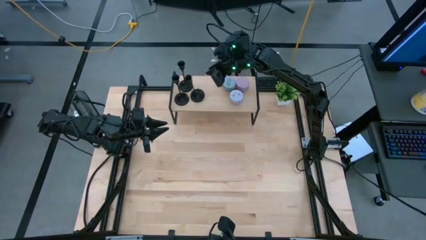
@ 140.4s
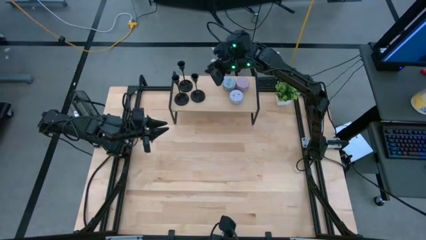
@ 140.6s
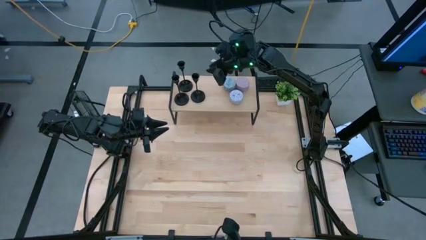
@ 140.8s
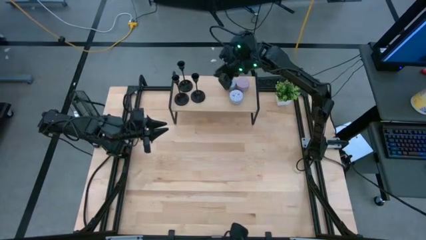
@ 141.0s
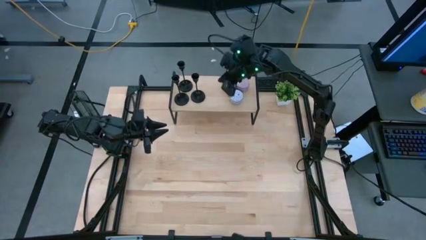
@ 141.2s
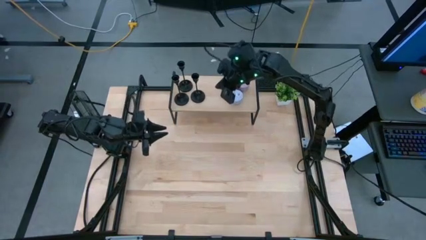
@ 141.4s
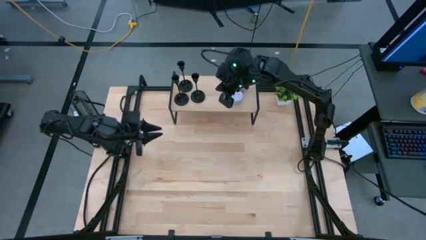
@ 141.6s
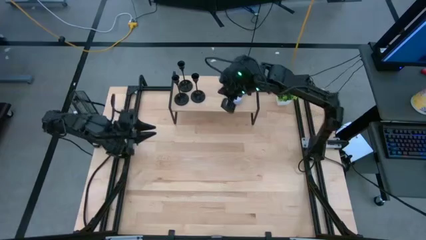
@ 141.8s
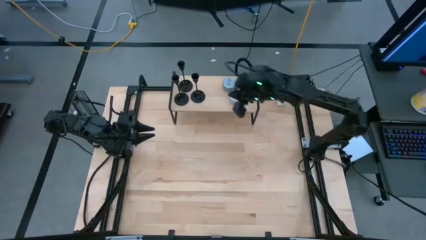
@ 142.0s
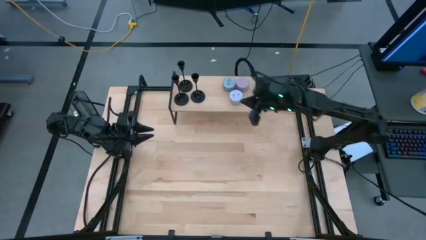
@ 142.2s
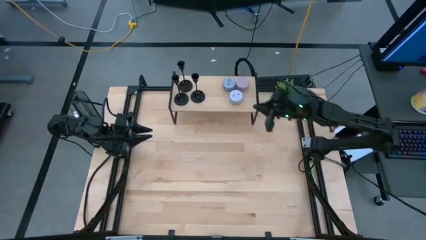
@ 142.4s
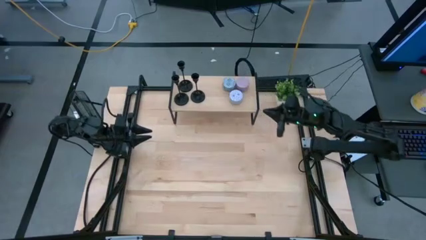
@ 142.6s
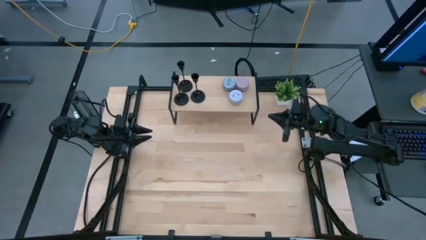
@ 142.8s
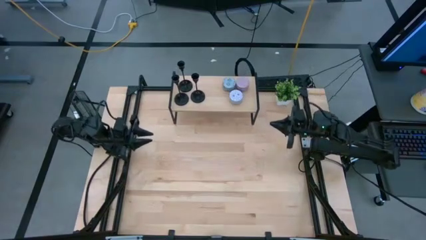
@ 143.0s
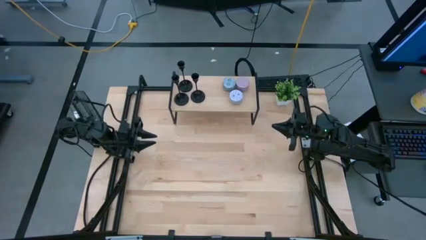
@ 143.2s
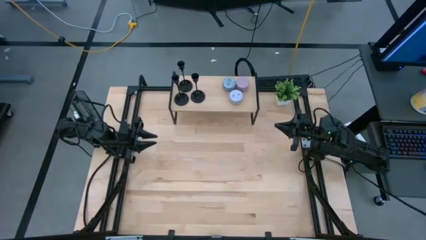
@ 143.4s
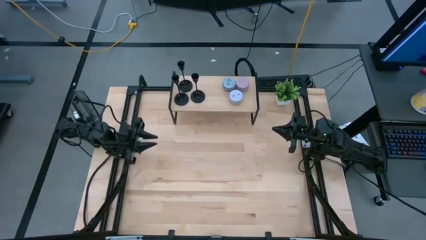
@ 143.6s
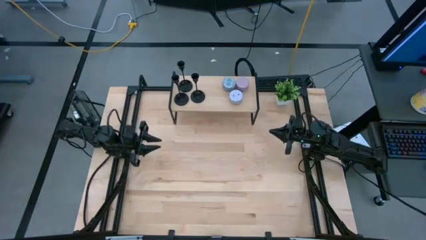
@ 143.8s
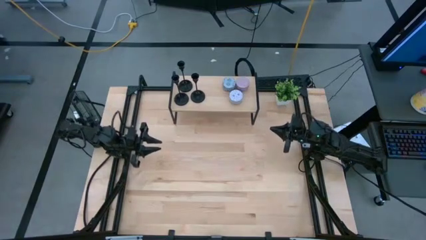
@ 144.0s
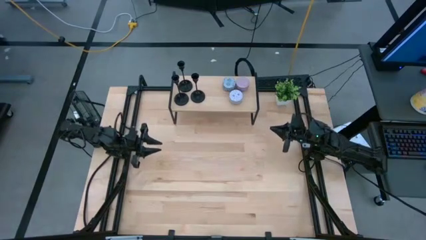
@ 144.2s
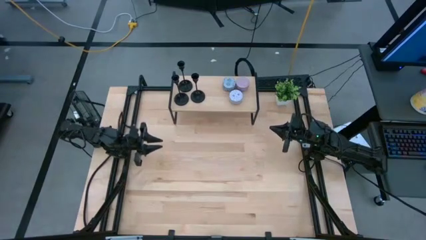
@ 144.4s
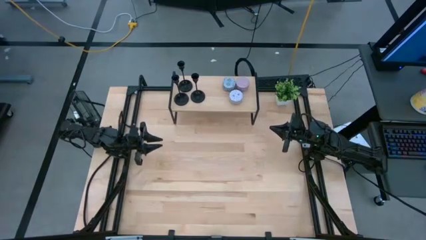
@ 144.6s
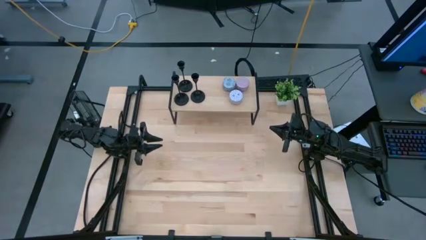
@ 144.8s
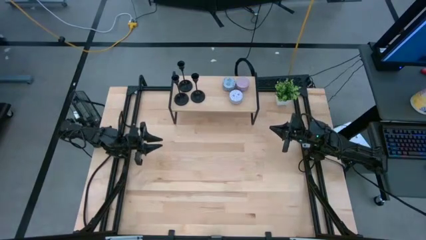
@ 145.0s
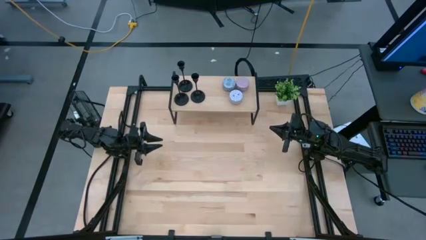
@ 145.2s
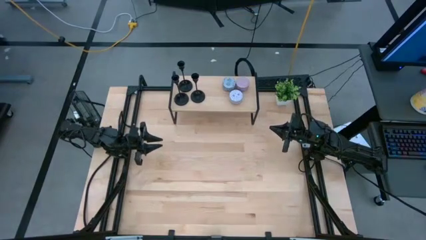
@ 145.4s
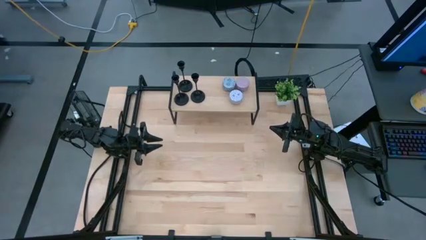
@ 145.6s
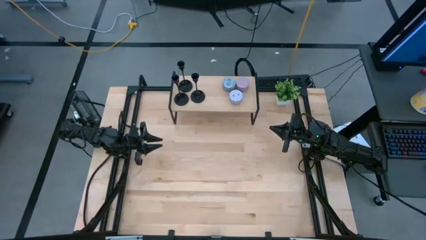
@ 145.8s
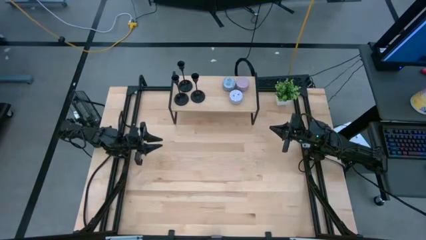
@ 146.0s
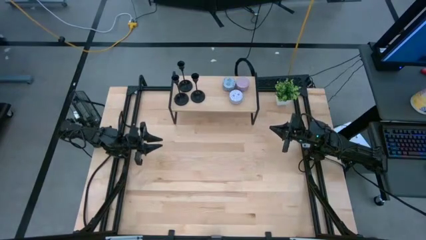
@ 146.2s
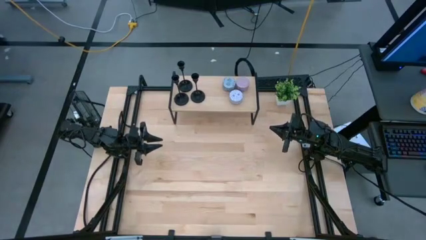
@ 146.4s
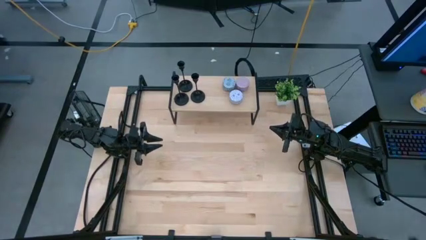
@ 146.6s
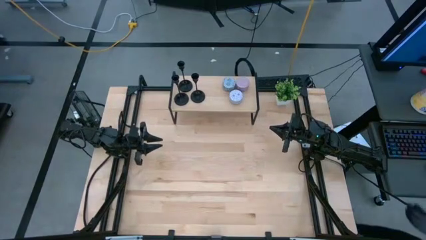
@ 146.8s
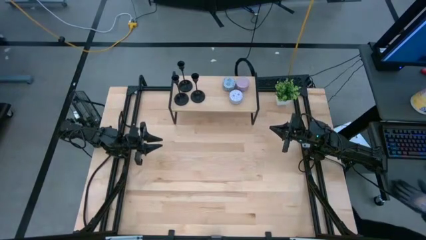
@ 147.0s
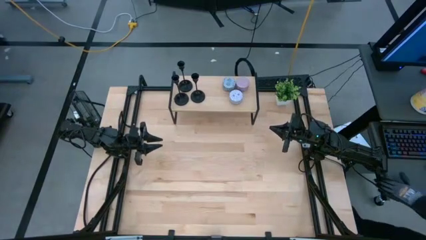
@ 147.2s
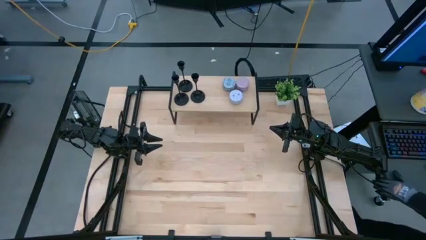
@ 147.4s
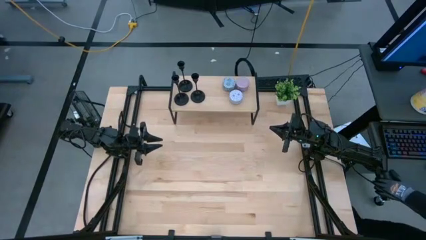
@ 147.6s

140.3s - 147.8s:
Task: Pick & Place candle stick holders
Return to Home Position

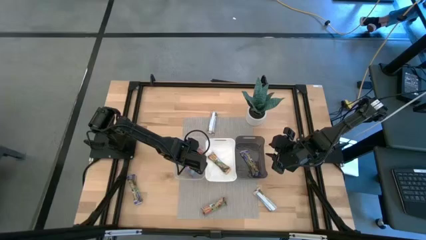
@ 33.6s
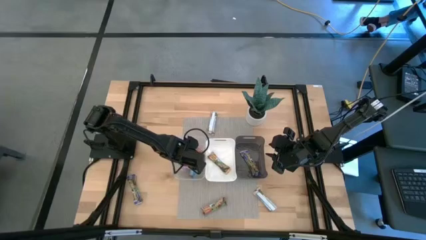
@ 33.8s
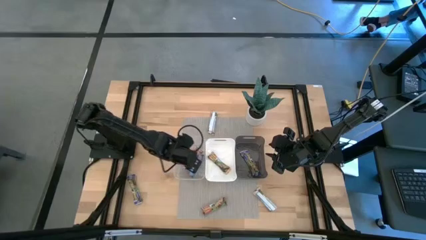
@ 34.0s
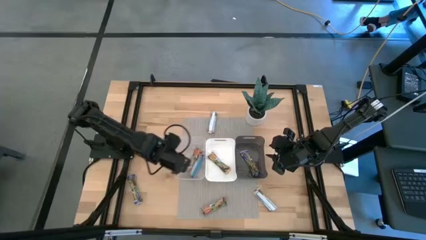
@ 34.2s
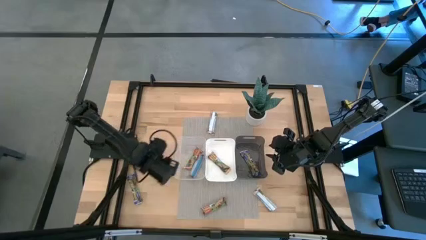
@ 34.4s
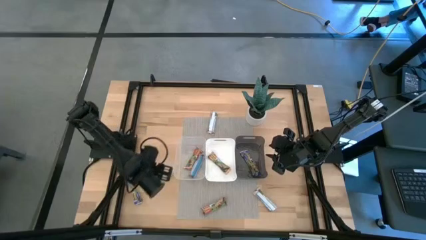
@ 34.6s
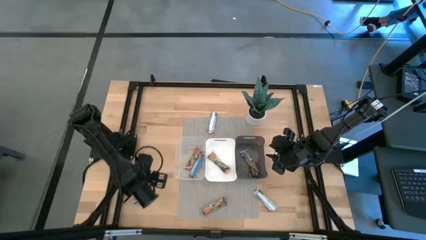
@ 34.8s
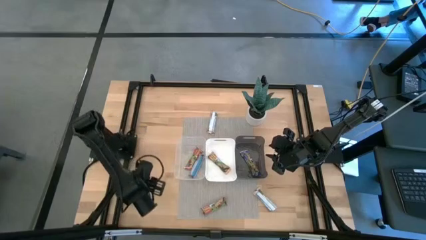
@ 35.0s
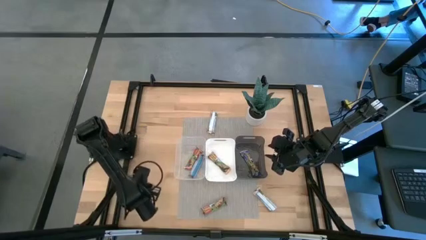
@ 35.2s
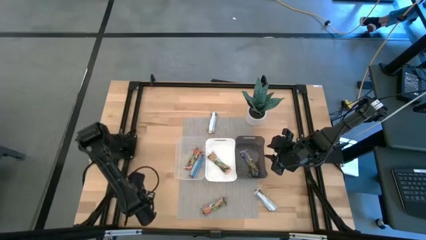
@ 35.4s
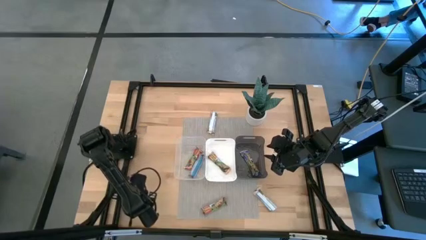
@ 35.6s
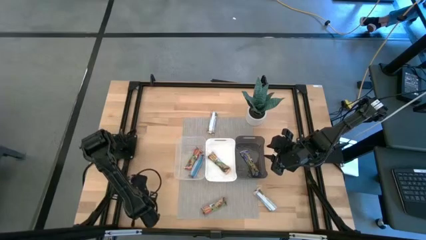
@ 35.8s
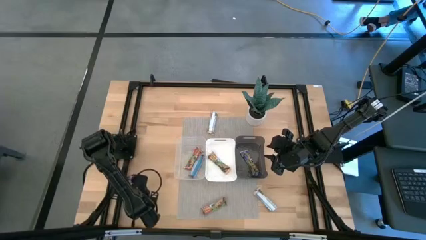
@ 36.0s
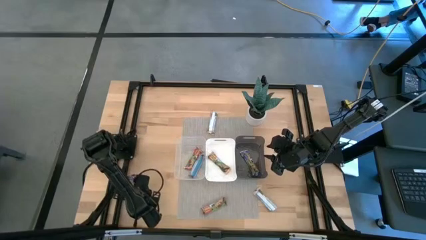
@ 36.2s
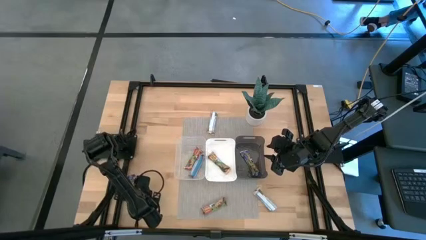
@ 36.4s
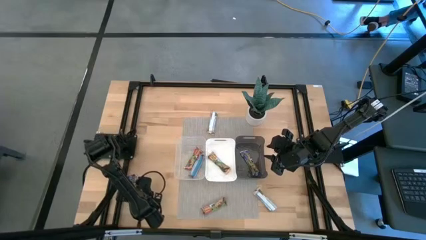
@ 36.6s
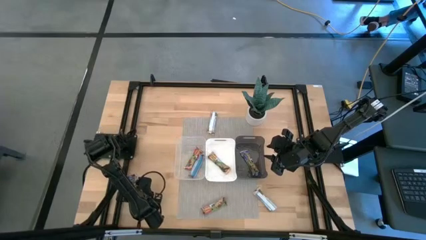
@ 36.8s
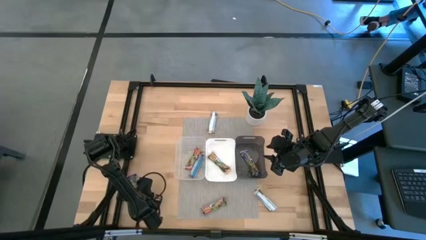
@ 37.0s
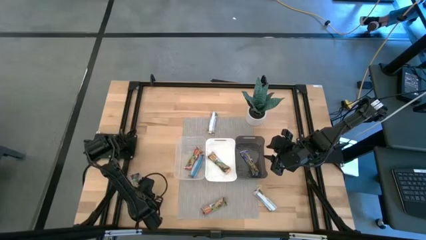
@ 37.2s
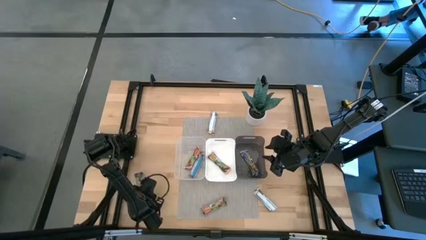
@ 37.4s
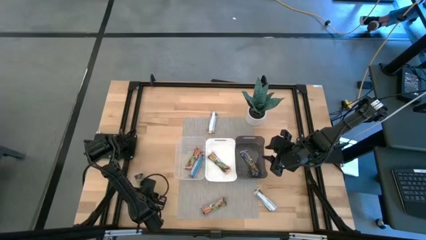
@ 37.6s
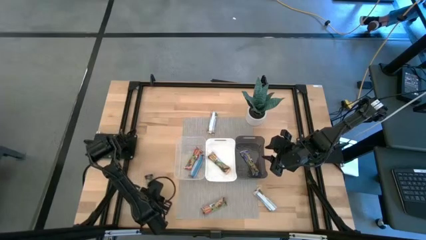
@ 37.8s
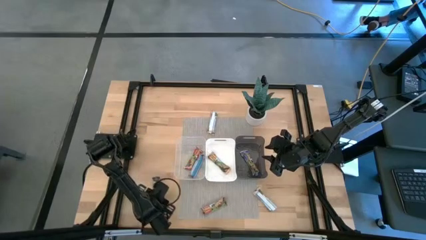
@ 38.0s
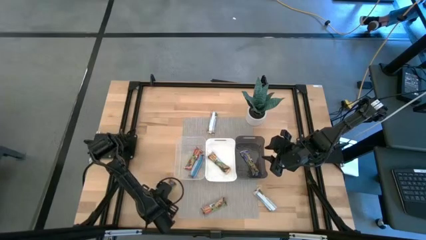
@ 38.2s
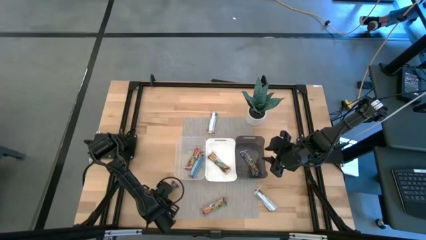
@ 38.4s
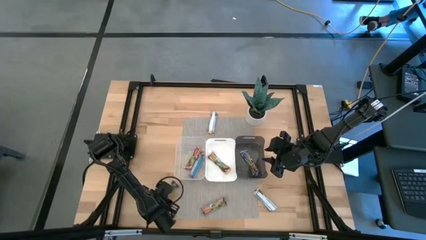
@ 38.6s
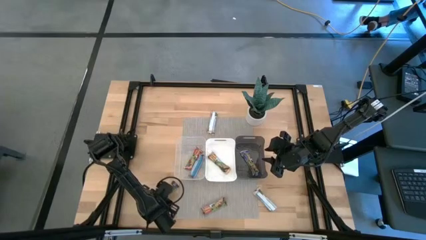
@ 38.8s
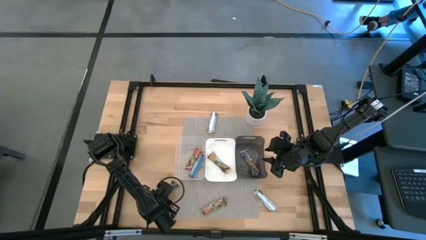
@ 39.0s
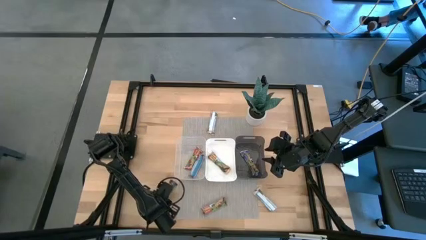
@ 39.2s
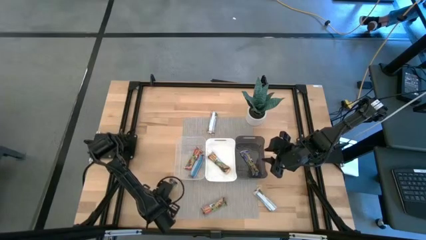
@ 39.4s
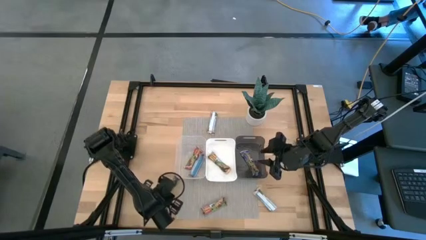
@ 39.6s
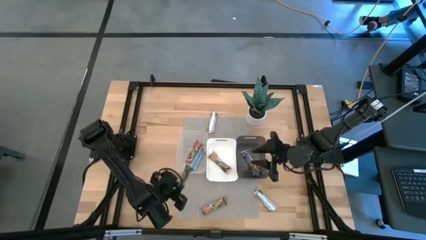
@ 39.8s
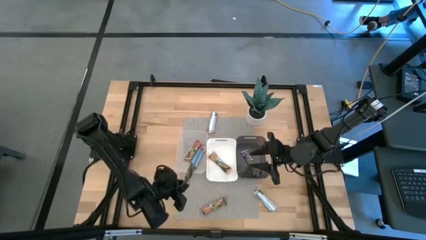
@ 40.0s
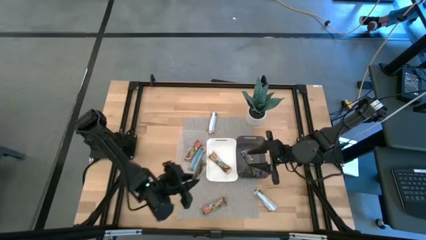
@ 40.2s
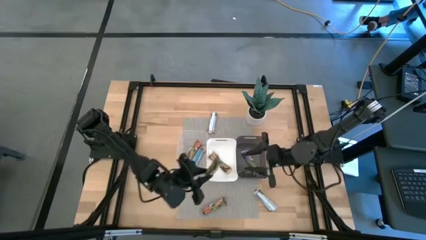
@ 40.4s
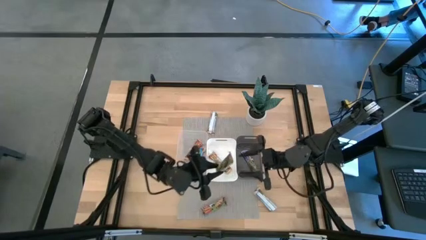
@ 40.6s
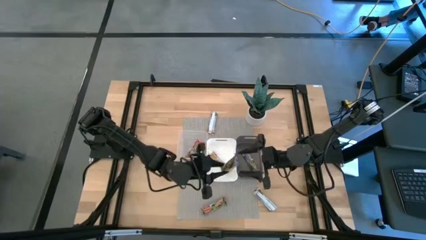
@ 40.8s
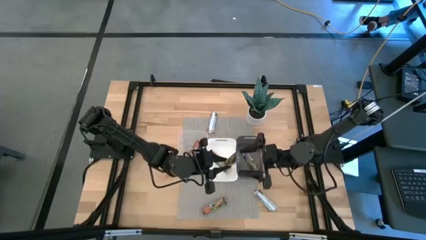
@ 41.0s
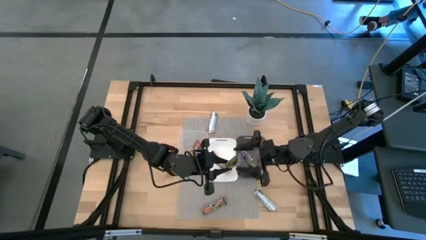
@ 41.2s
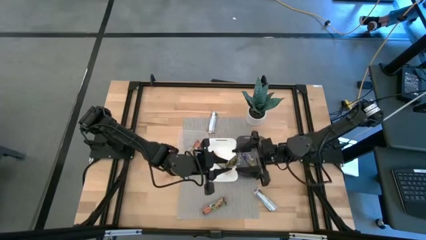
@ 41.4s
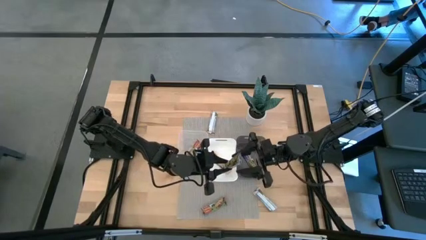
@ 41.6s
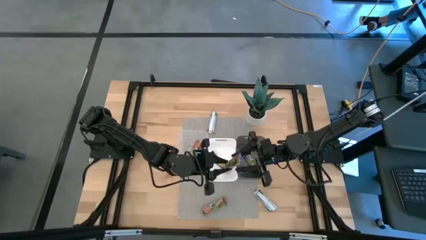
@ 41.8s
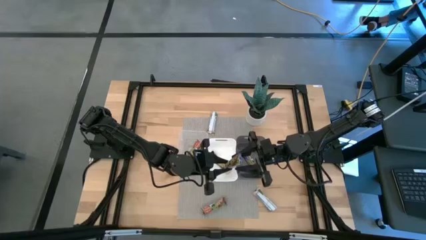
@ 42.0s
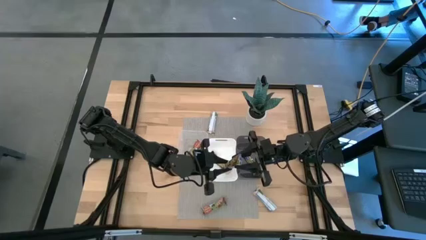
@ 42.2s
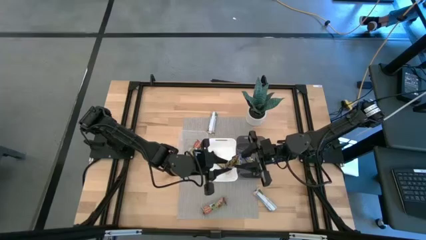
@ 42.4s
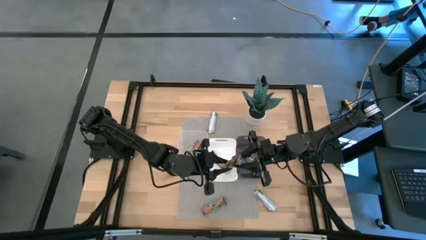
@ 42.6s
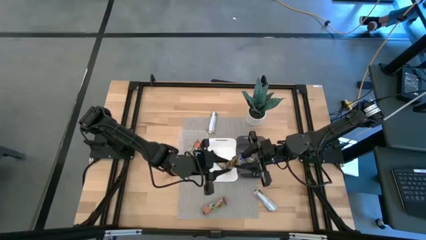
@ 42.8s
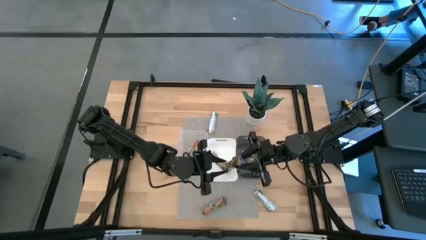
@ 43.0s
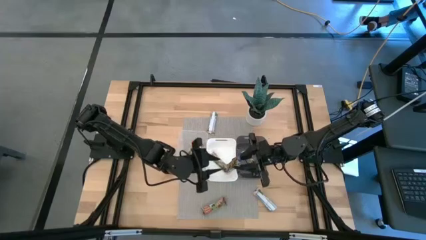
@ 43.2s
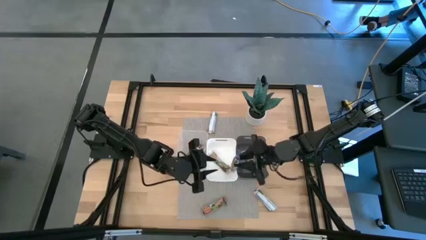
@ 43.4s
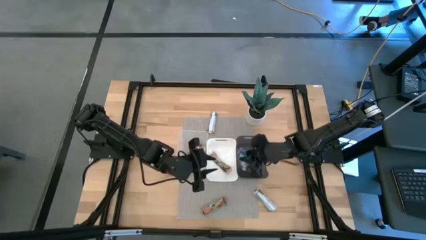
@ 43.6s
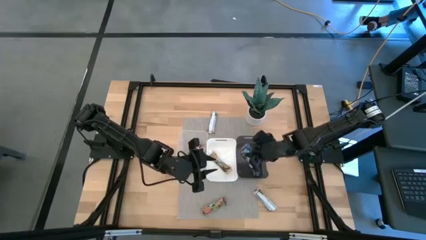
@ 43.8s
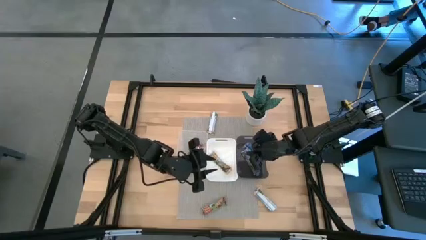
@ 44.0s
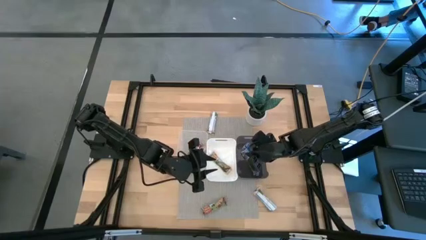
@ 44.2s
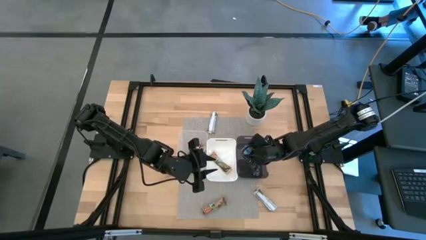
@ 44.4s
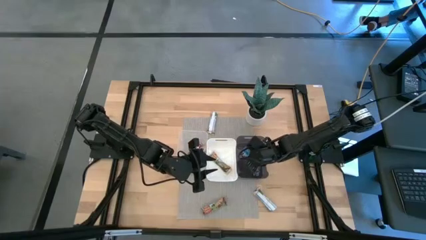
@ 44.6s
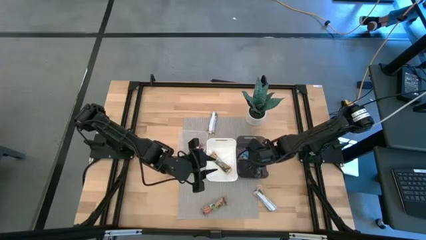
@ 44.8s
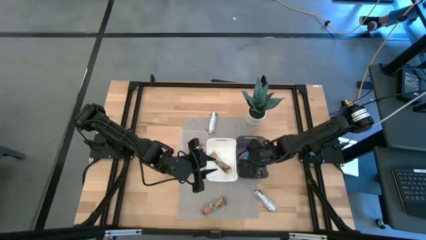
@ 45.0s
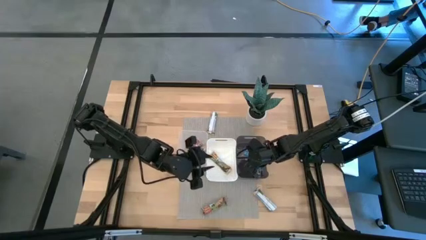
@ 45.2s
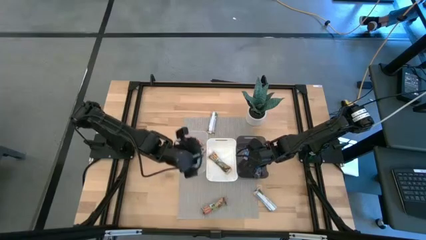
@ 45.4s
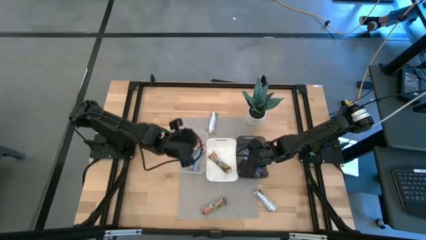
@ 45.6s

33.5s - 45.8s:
Task: Pick and place Granola Bars by type
Put the blue granola bar into the black bin
